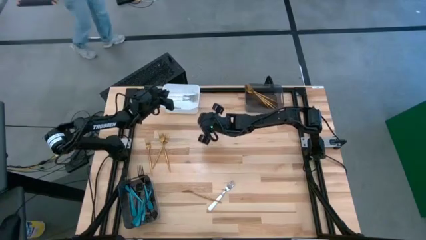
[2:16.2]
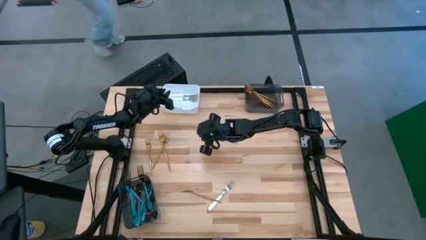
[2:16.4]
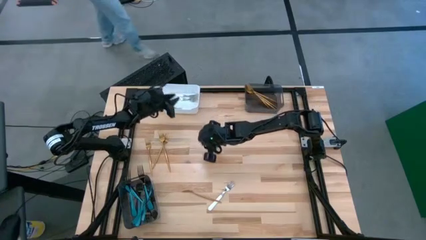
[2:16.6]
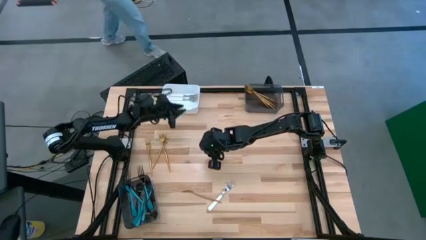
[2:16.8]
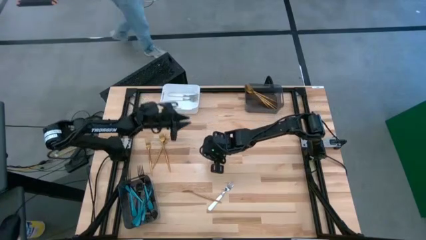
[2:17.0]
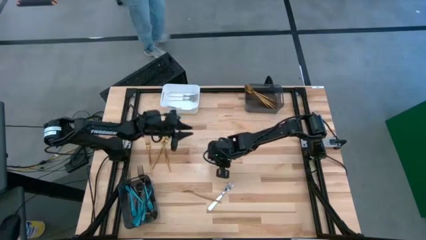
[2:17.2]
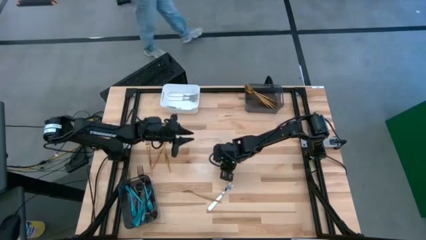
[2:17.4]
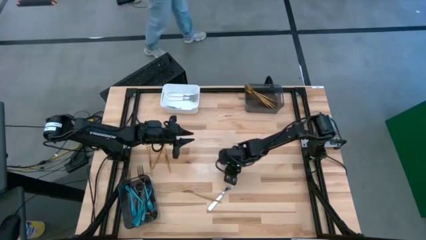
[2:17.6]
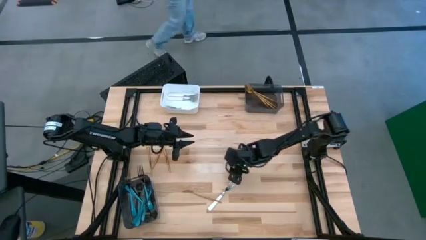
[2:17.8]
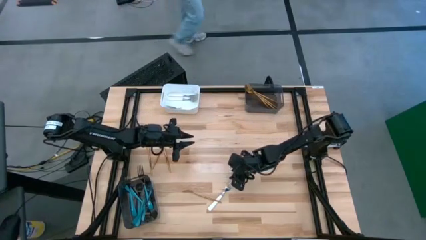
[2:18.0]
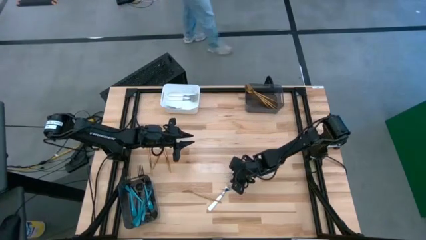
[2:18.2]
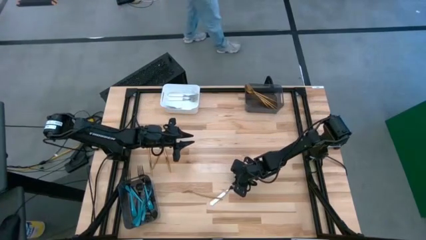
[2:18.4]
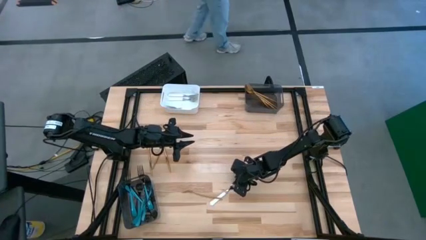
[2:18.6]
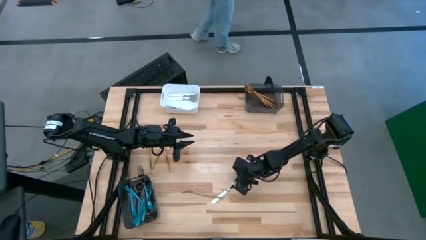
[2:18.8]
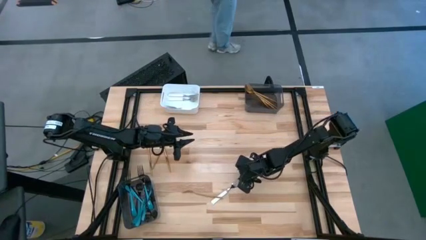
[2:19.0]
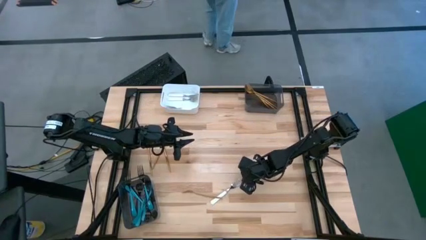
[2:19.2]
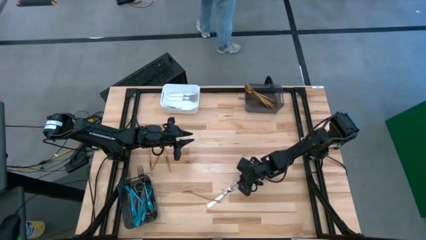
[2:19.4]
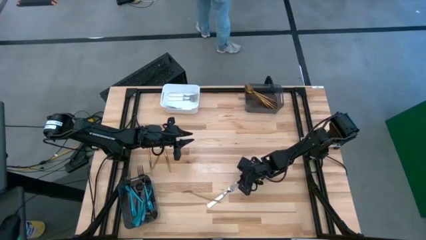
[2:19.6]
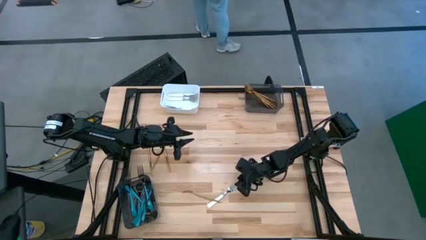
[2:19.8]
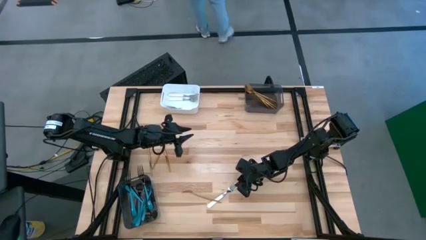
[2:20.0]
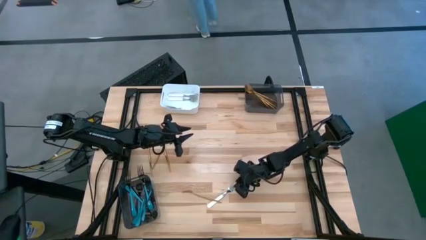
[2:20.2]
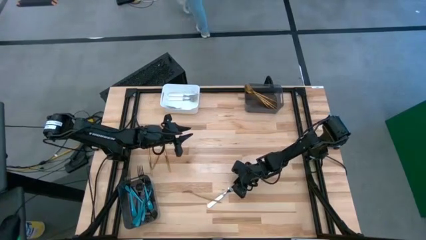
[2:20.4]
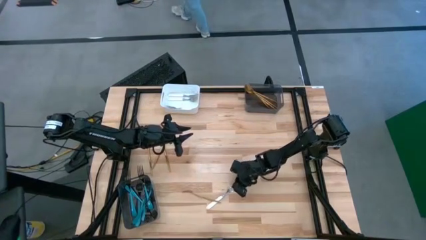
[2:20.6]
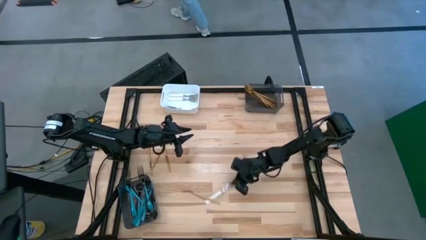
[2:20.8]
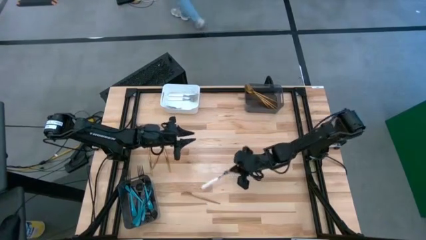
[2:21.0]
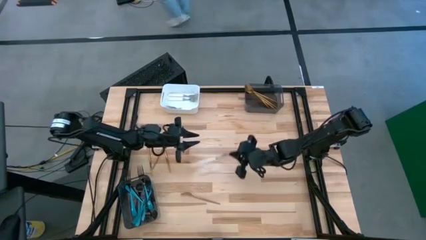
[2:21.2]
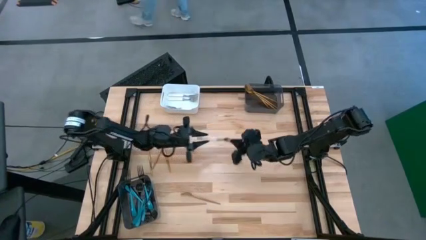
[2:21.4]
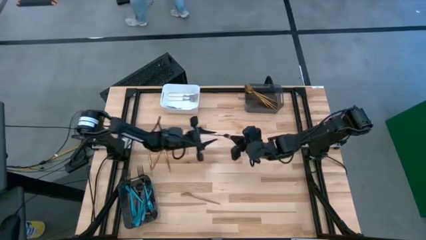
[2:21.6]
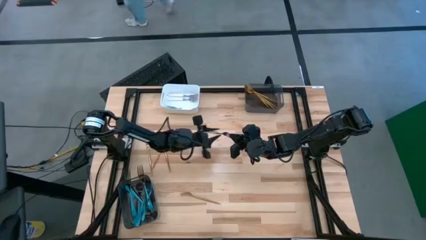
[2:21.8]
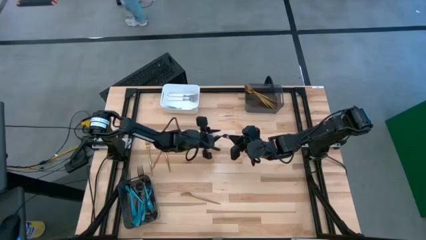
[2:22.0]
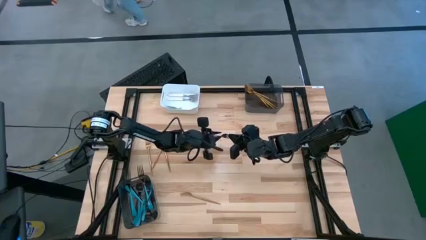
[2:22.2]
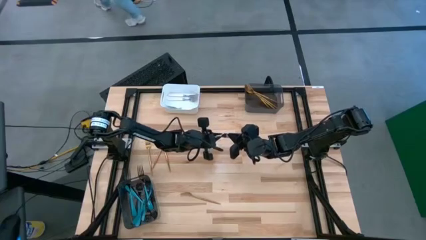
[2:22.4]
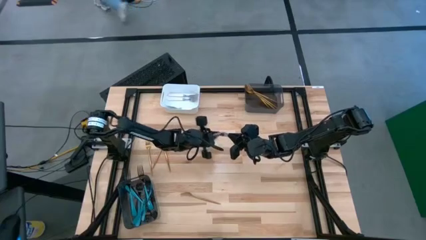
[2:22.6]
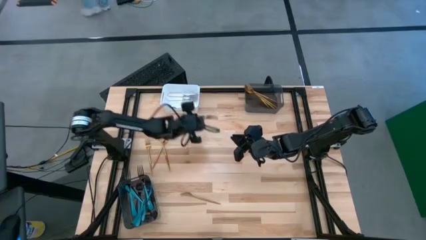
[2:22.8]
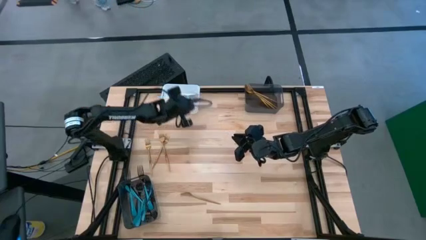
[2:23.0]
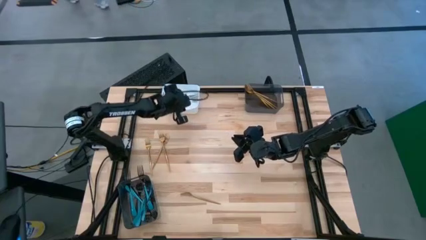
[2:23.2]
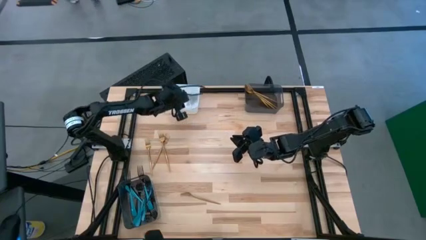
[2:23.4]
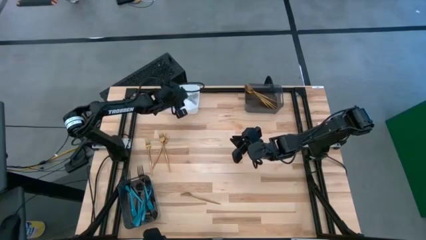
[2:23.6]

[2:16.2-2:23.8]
Task: Sort silverware by color (type)
Put the white fork into the white bin

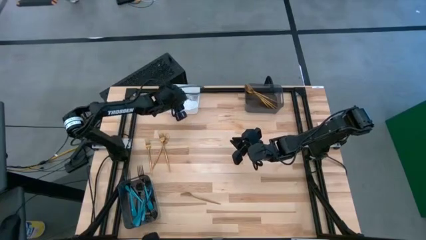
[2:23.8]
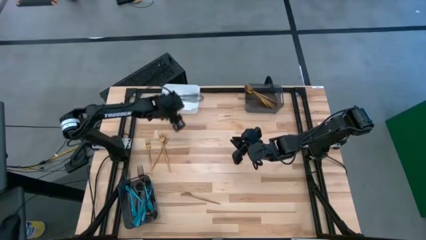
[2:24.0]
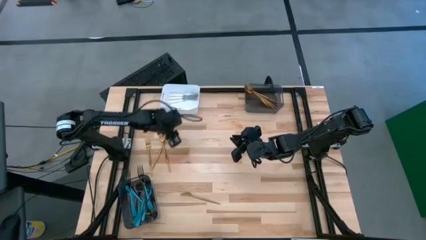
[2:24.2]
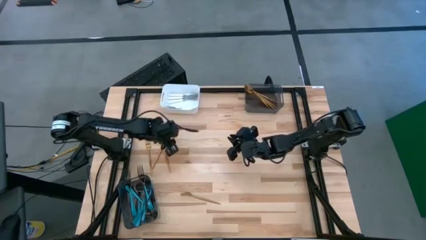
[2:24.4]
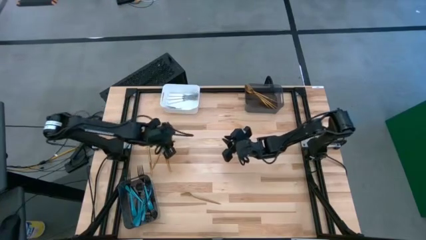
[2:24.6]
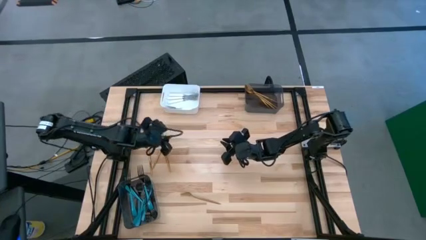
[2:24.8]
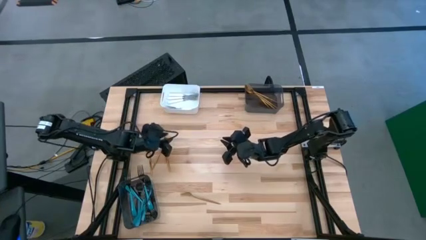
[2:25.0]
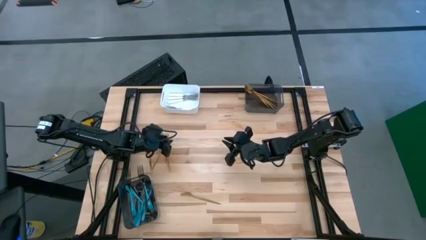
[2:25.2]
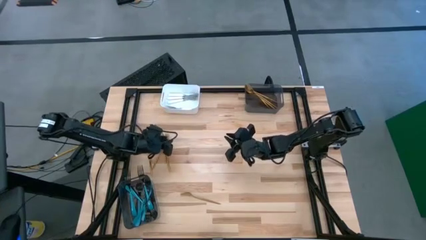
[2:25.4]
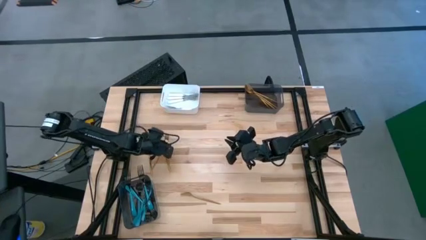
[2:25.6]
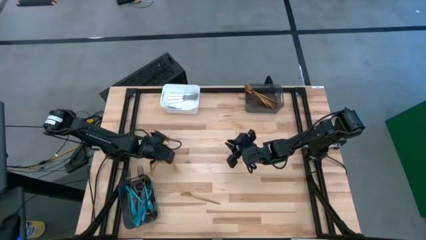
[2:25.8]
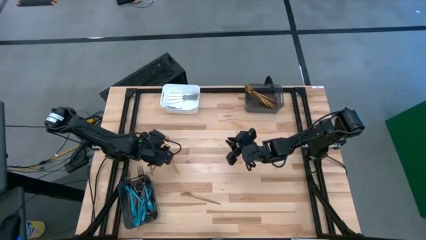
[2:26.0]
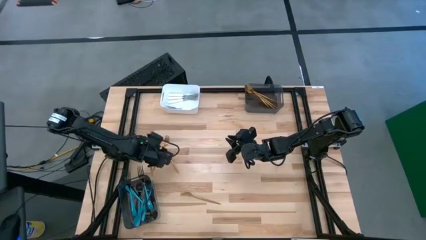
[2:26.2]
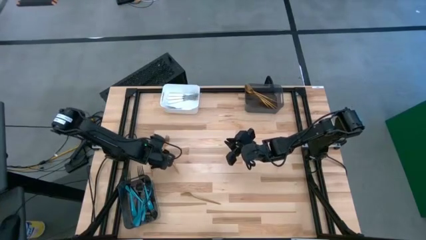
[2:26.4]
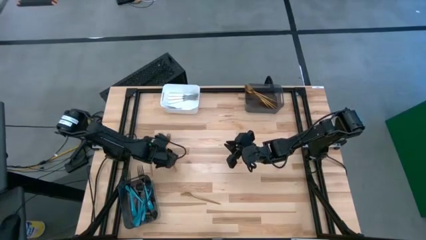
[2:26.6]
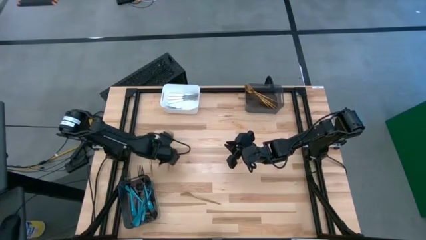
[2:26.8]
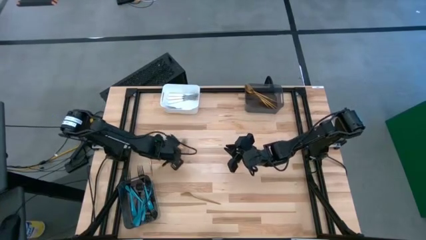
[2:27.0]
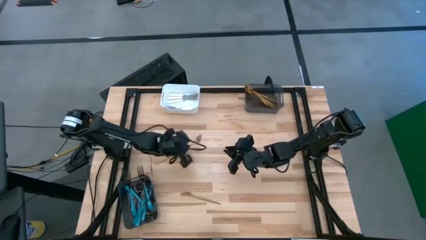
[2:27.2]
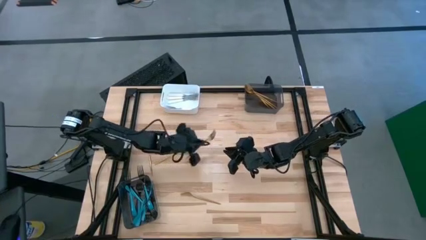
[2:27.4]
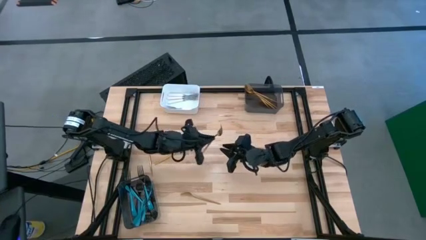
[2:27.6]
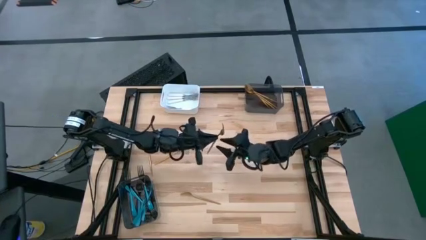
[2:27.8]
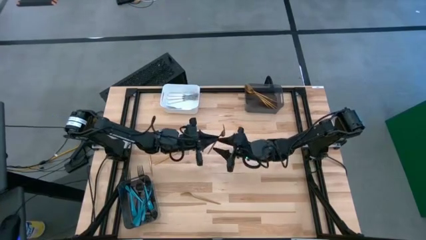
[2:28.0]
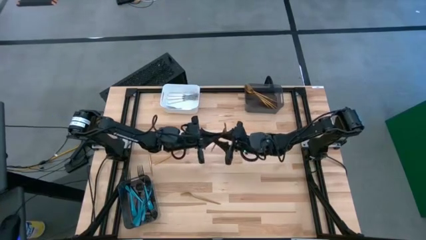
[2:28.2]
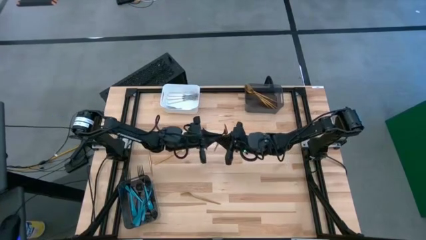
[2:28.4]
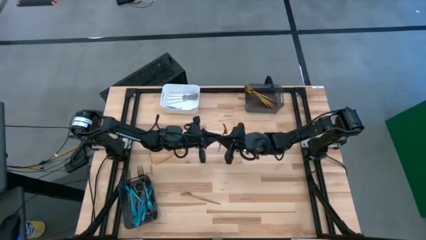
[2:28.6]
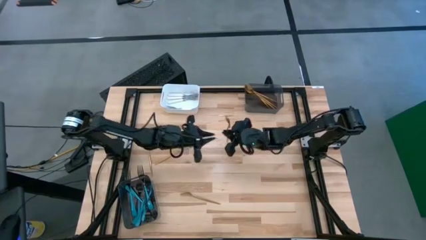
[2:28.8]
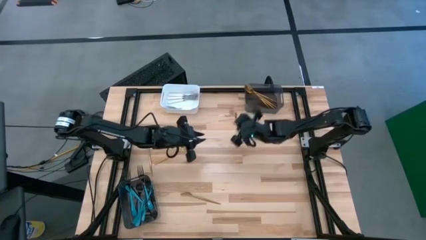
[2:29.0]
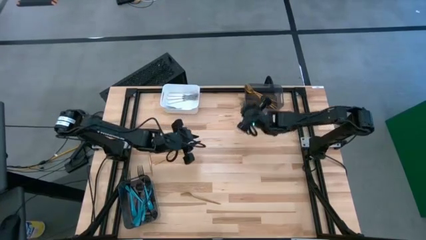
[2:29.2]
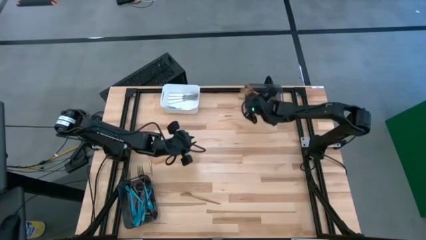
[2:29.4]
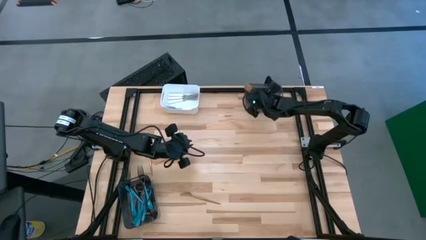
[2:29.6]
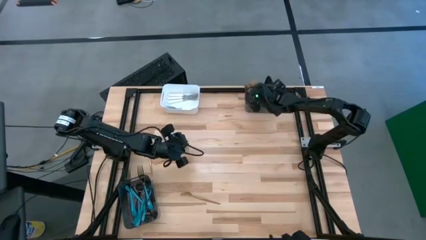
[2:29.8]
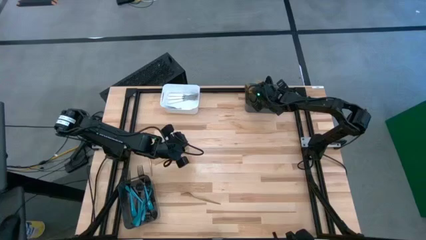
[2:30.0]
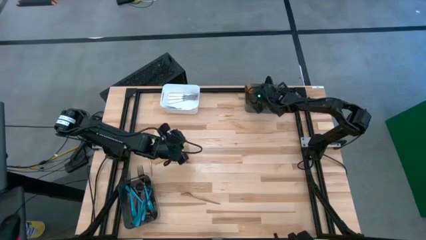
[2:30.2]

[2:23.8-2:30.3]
Put the gold fork into the top black bin

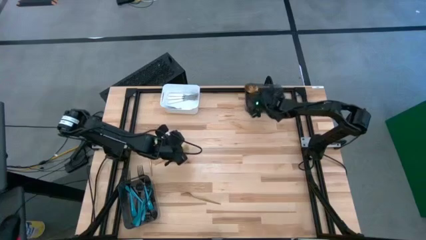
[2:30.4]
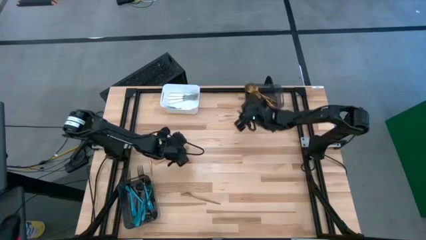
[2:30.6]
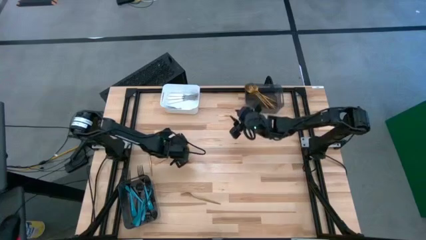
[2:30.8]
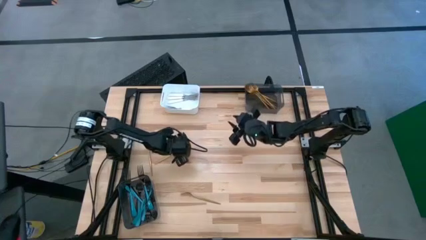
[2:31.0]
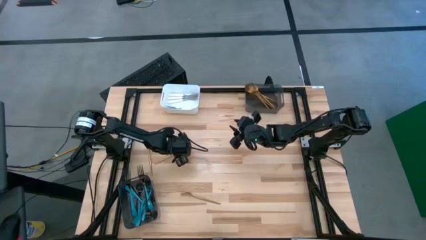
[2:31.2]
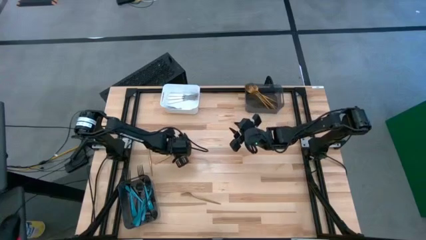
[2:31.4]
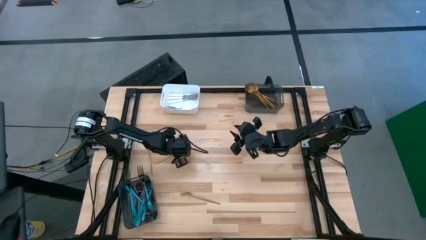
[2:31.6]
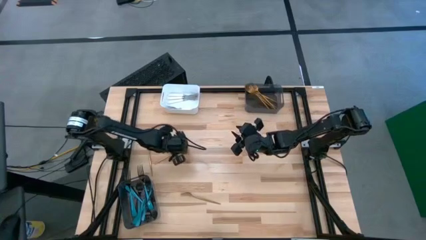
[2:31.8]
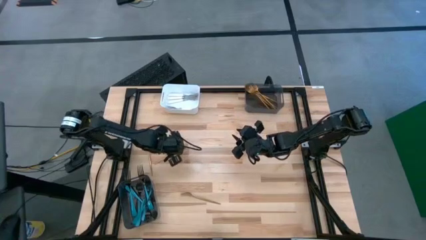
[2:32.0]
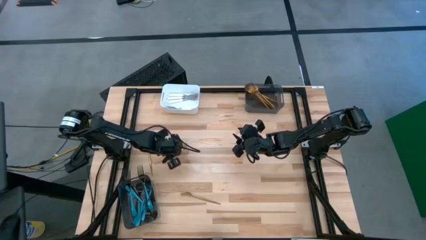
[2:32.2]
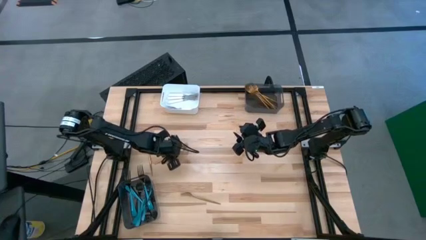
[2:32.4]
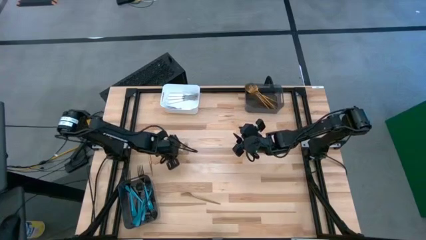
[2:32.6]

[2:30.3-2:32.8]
Put the gold fork into the top black bin
